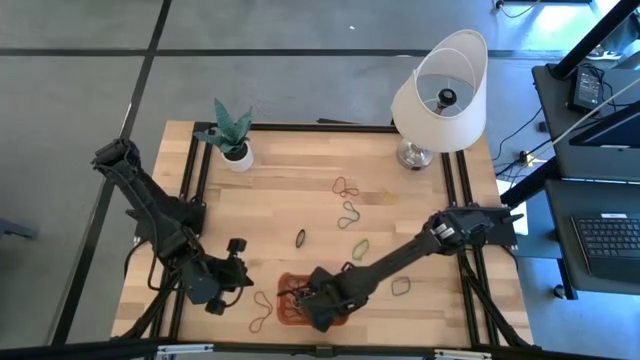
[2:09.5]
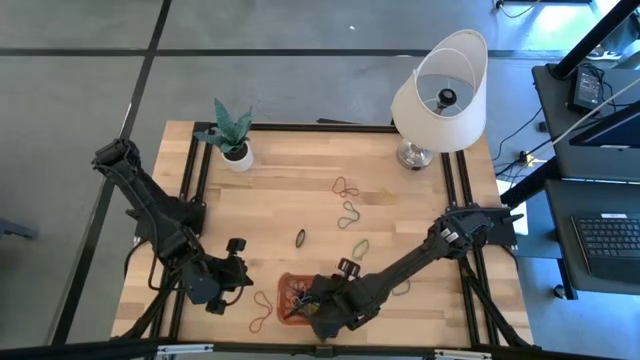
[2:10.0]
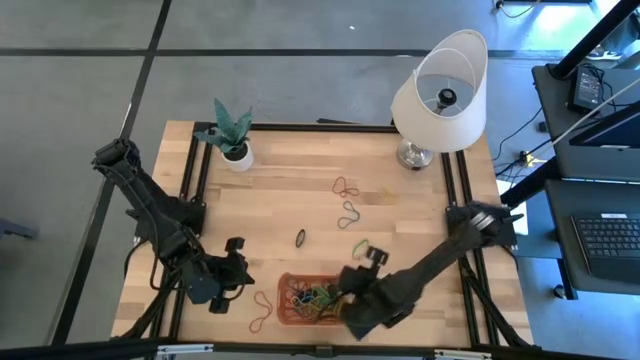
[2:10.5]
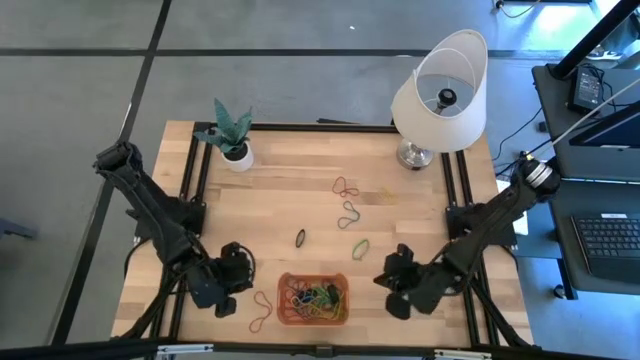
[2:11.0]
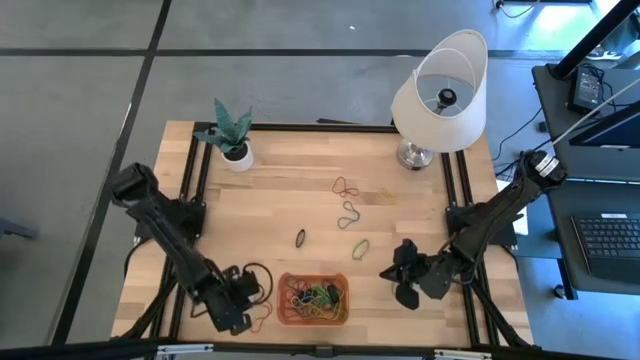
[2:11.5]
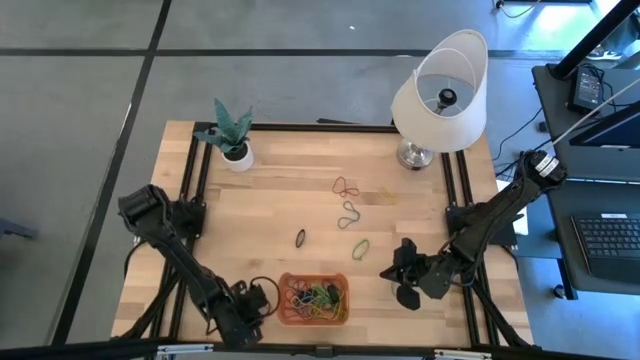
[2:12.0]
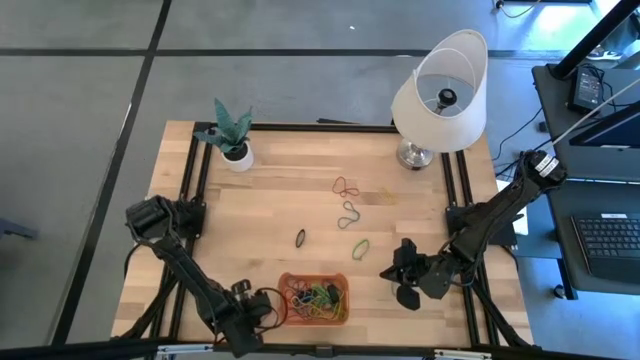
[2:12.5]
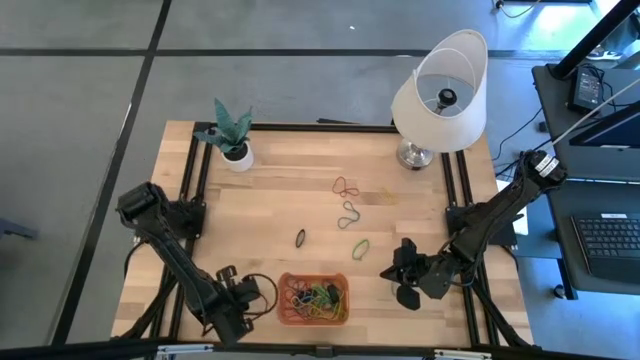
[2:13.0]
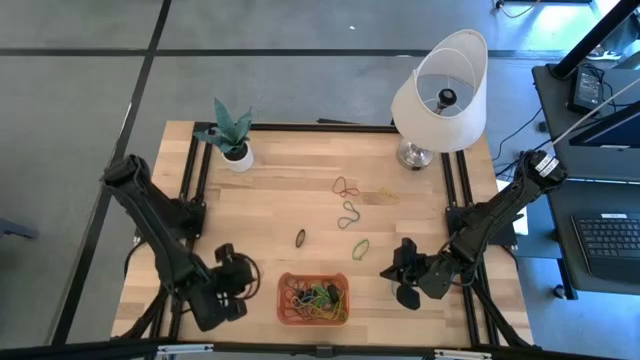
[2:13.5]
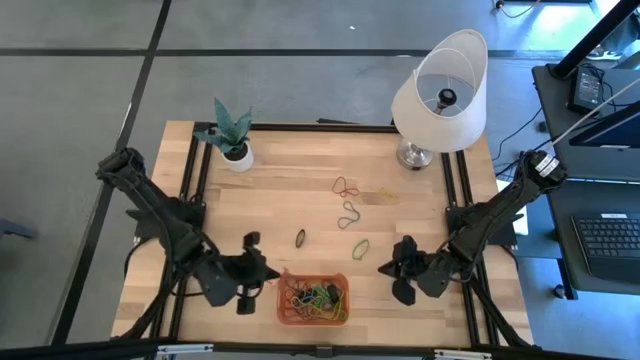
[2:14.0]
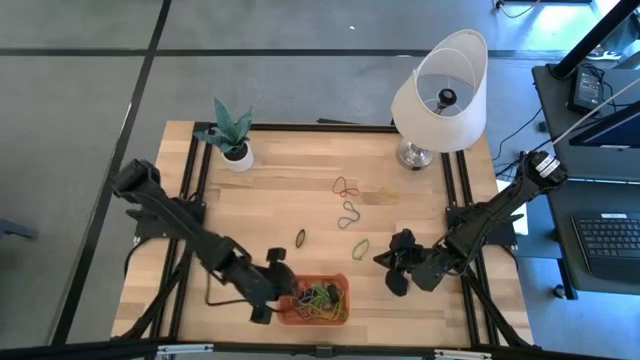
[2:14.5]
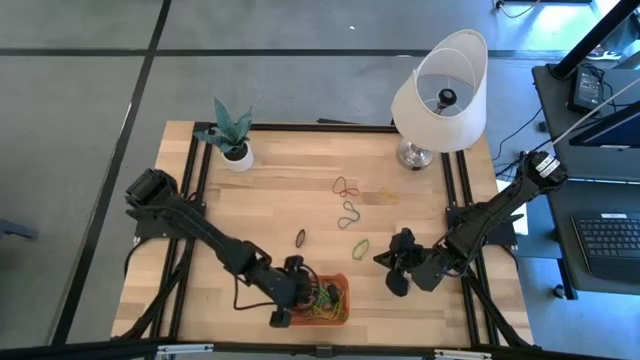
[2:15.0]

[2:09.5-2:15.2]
Task: Pick and place rubber bands into bin
Put the bottom red rubber band into the bin

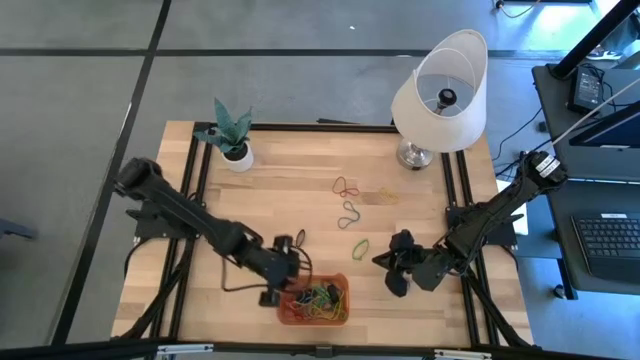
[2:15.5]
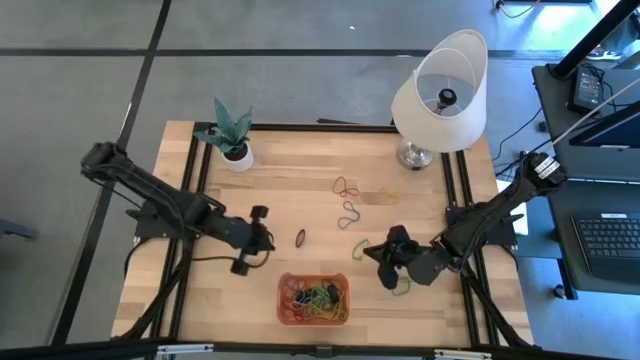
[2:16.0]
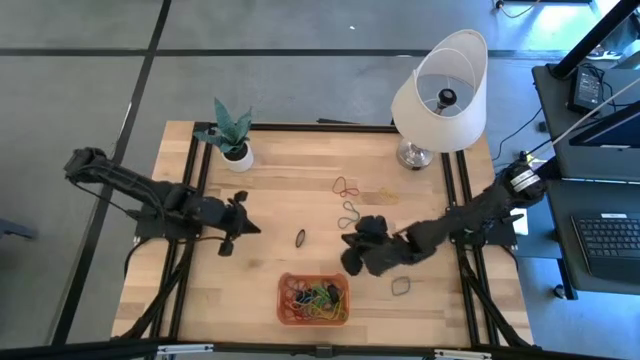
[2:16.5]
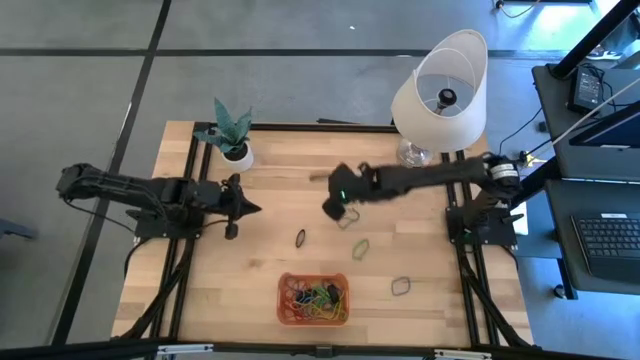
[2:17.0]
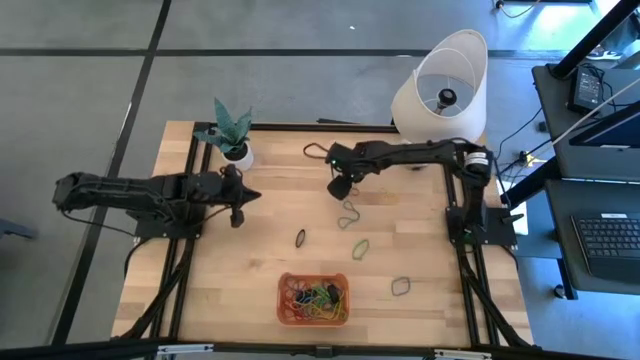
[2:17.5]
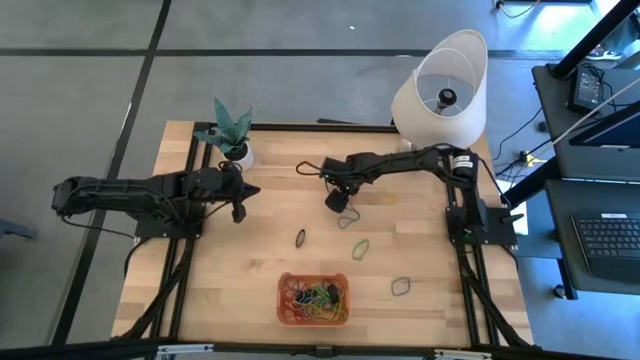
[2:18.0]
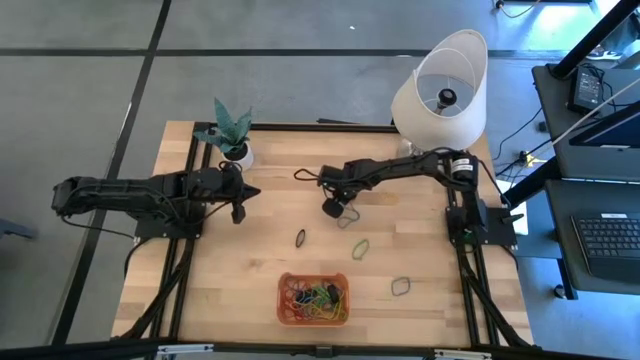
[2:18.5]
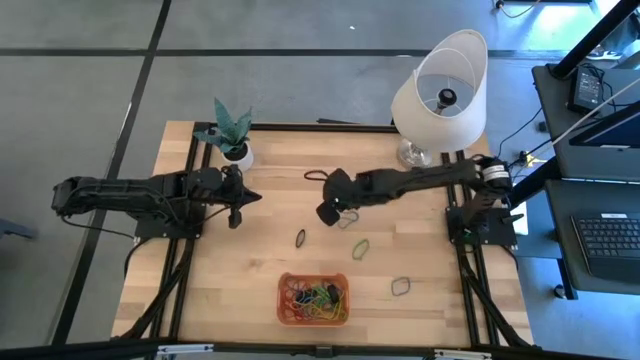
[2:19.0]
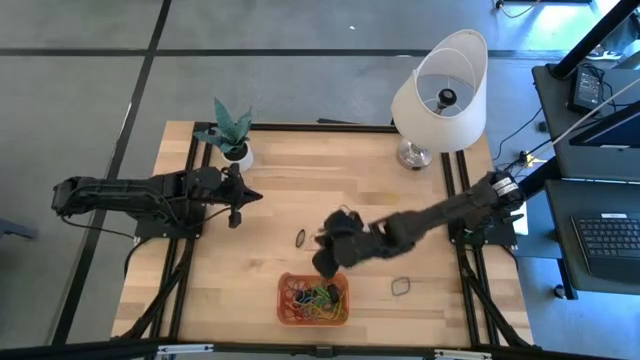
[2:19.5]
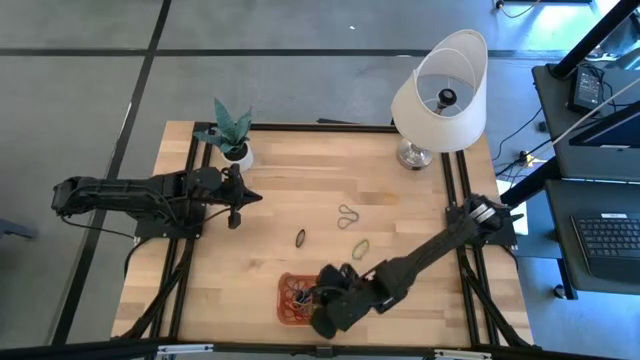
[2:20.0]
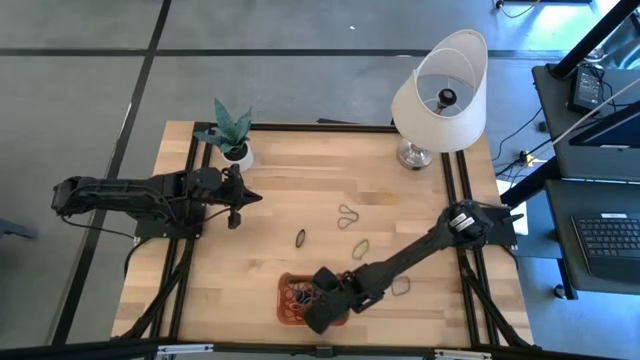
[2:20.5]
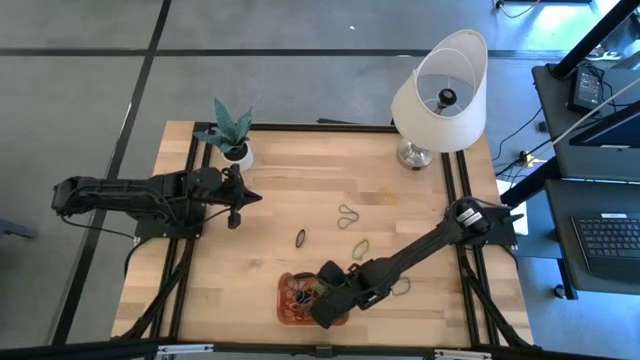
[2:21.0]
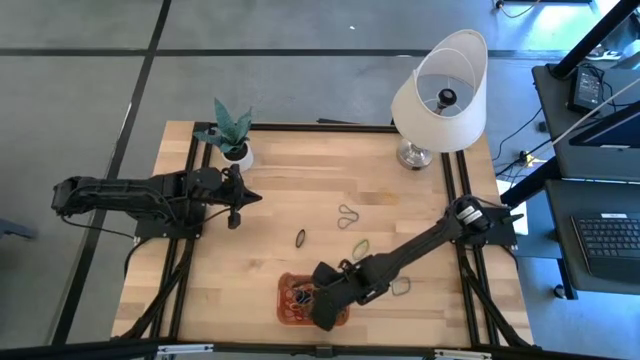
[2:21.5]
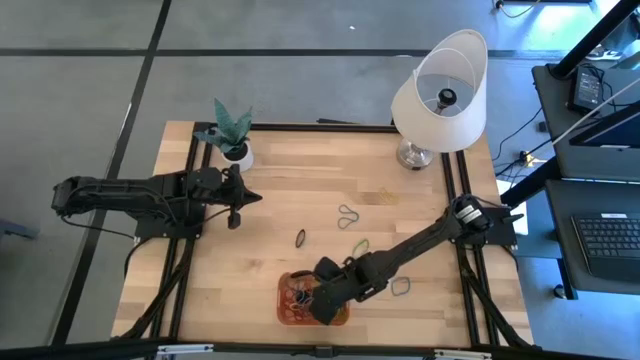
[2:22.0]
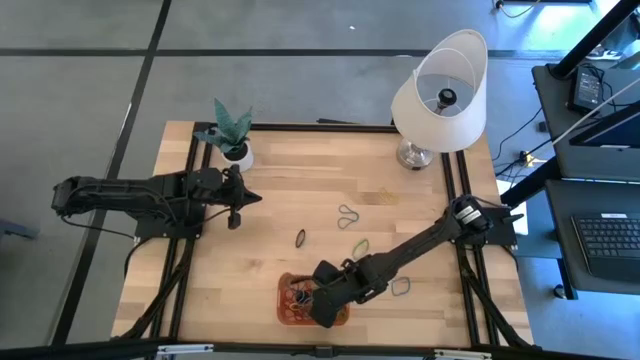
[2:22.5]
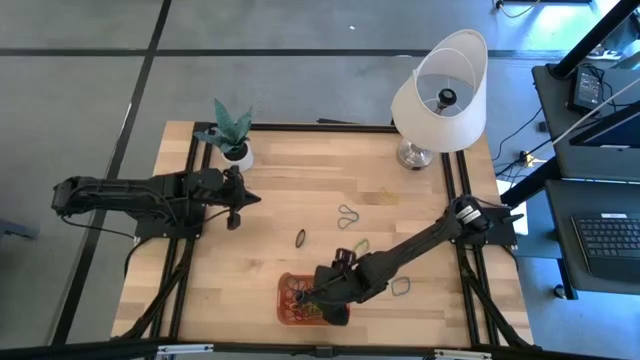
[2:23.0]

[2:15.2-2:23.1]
Put the red rubber band into the bin

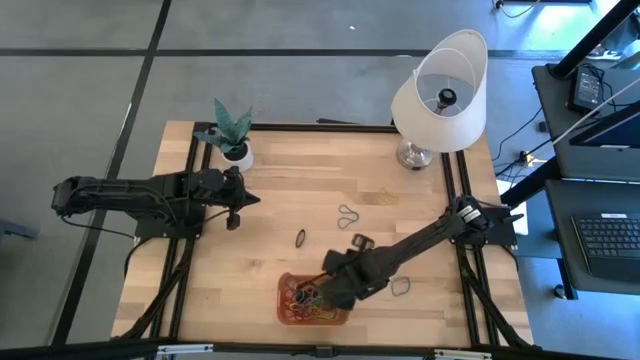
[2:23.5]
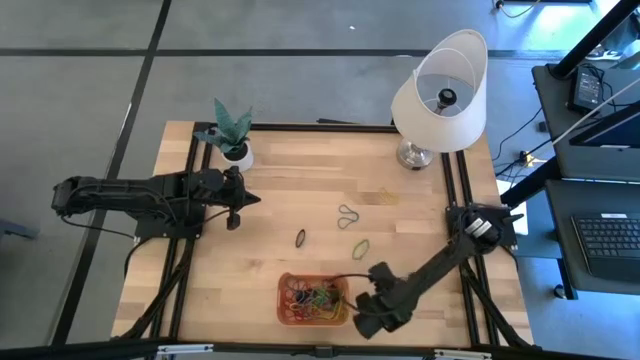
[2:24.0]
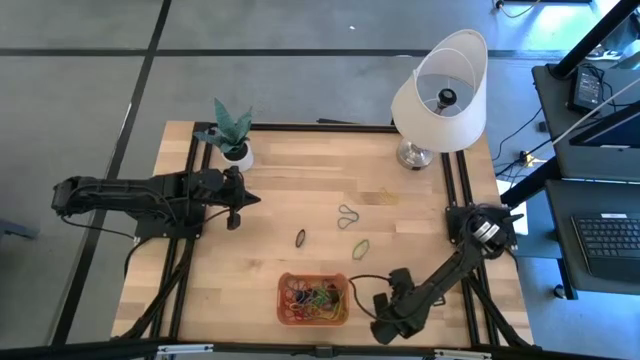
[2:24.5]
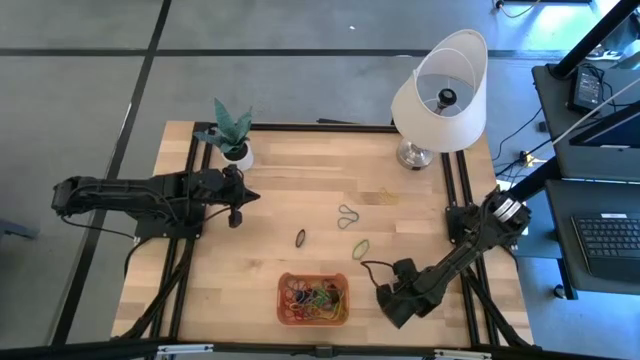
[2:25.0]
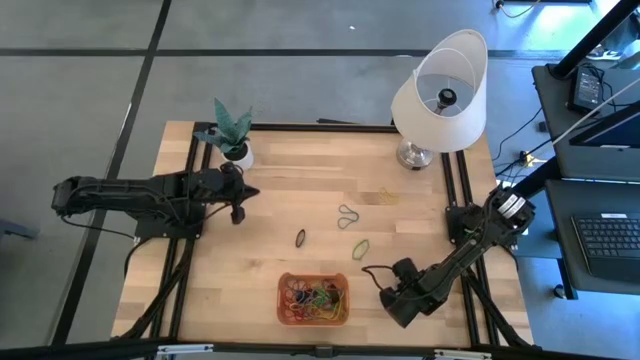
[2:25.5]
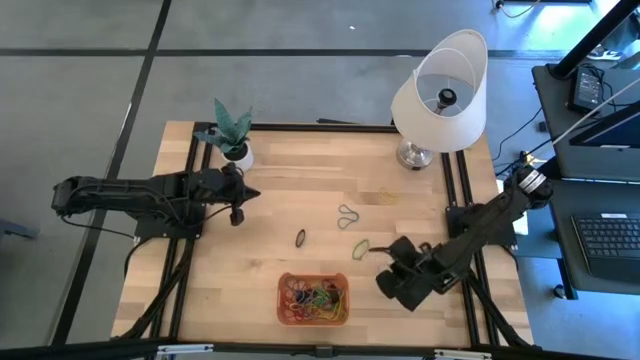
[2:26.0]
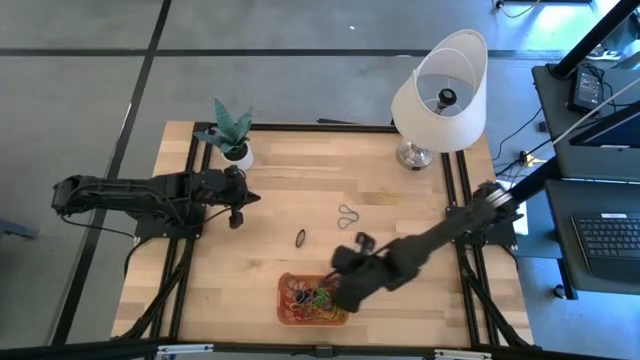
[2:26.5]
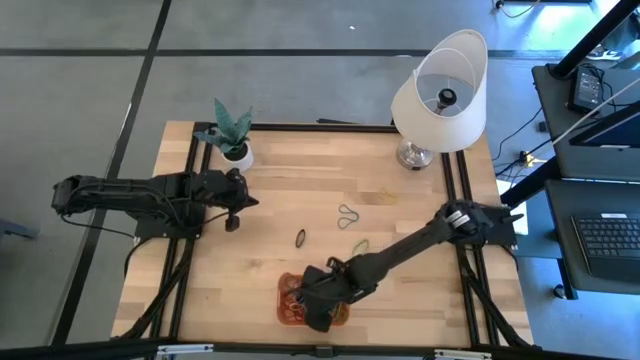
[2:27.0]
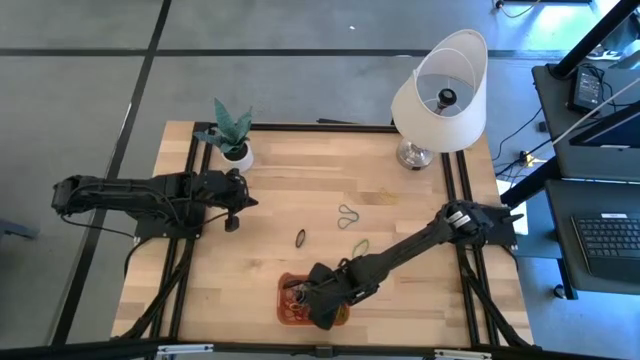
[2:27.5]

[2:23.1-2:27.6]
Put the bottom blue rubber band into the bin

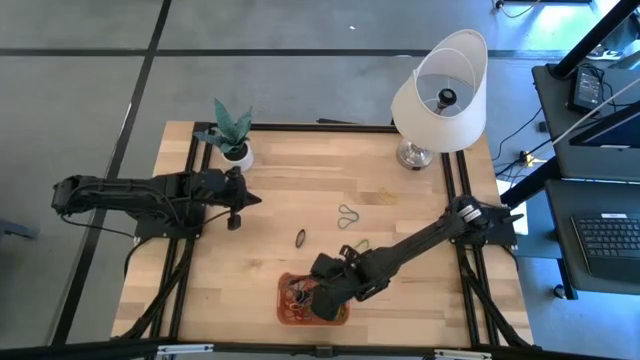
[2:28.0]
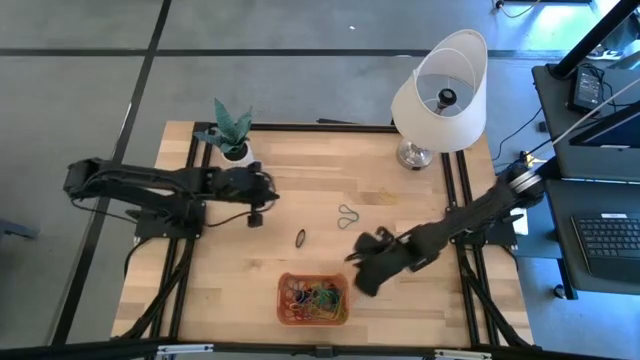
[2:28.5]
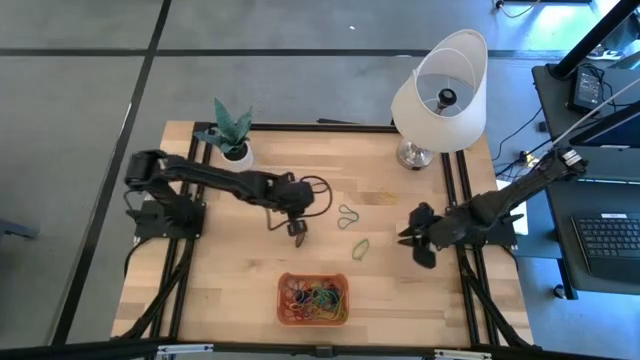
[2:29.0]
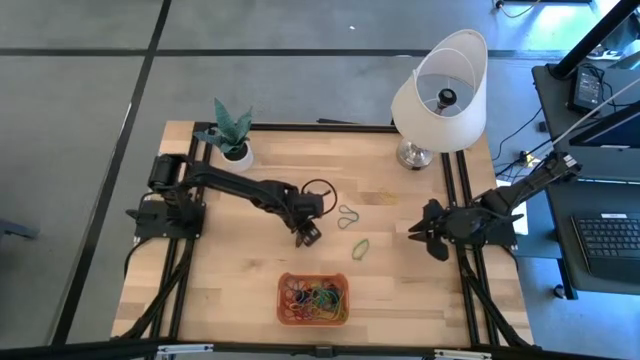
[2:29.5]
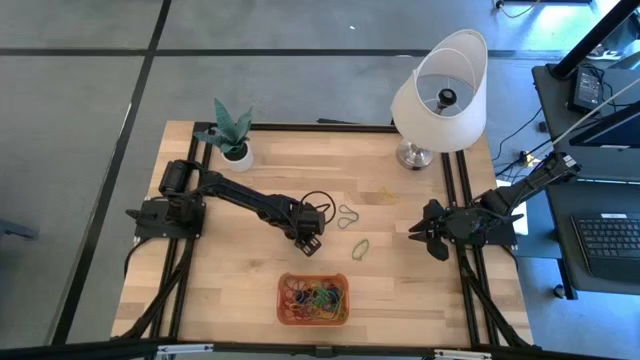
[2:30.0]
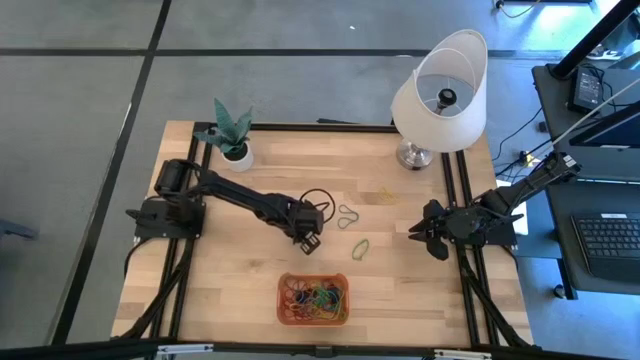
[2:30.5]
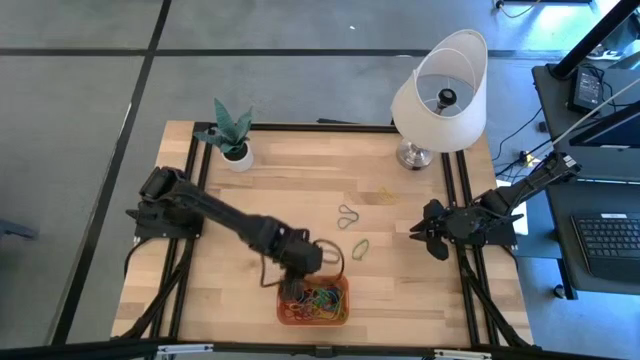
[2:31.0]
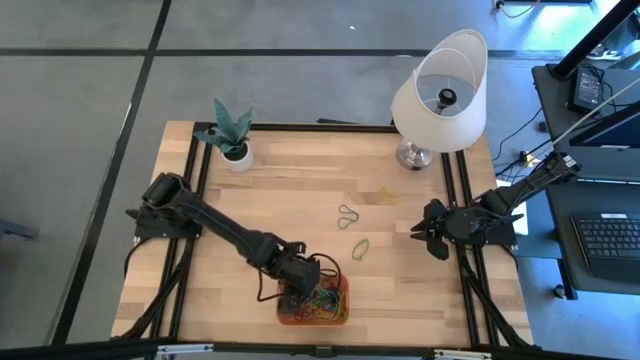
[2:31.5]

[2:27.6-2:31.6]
Put the black rubber band into the bin
